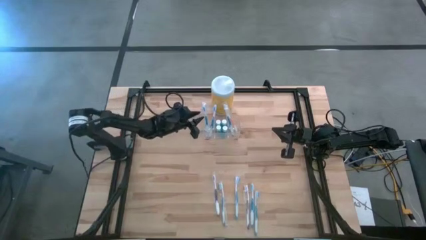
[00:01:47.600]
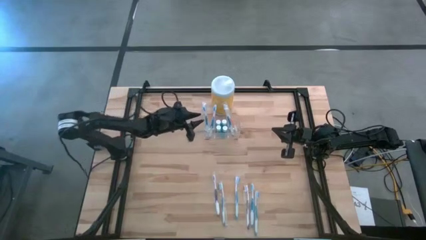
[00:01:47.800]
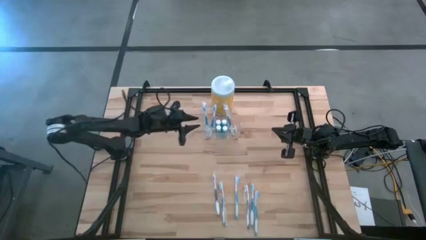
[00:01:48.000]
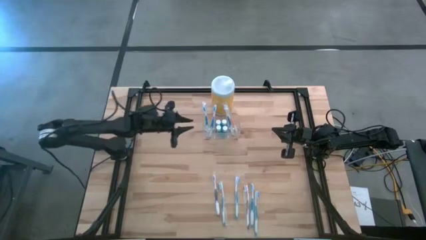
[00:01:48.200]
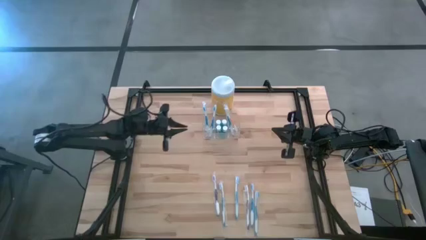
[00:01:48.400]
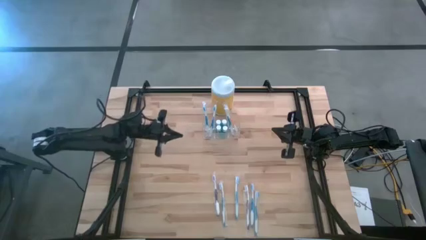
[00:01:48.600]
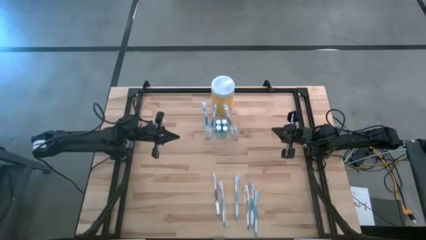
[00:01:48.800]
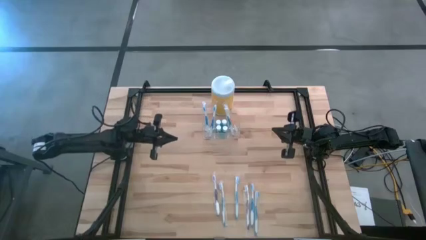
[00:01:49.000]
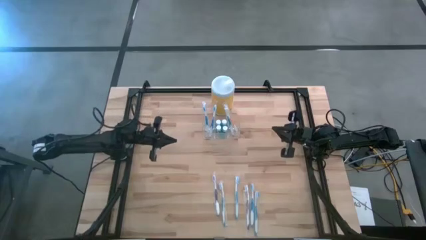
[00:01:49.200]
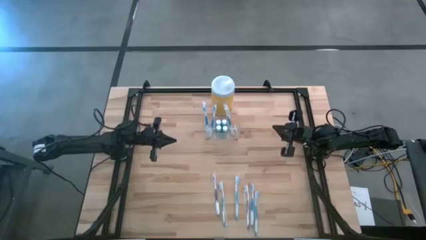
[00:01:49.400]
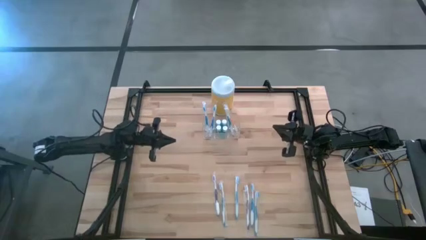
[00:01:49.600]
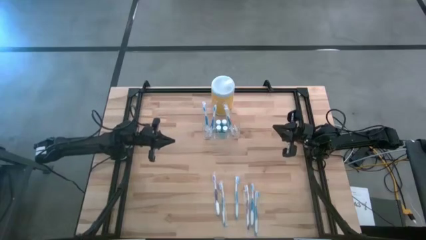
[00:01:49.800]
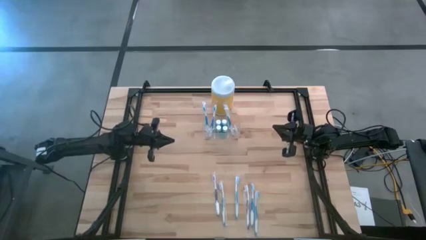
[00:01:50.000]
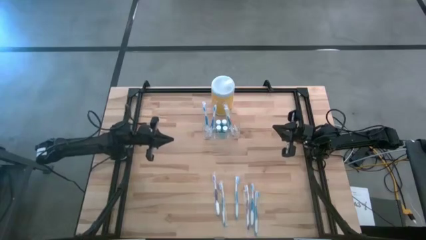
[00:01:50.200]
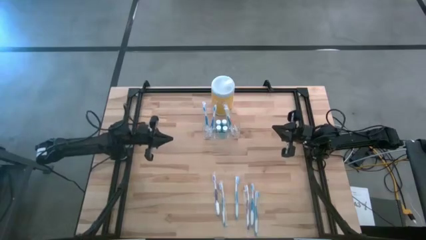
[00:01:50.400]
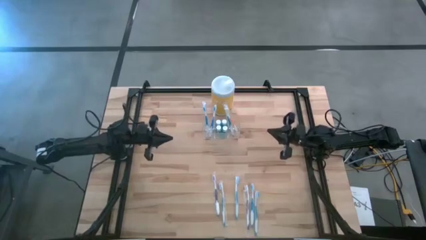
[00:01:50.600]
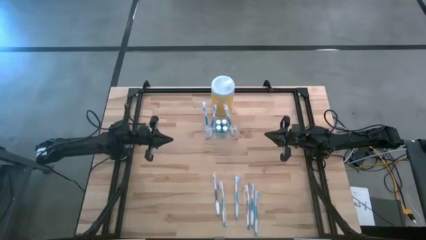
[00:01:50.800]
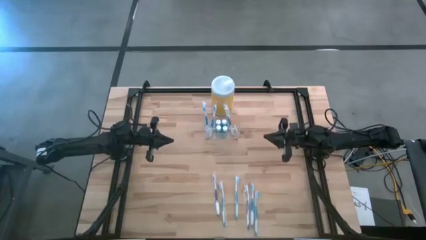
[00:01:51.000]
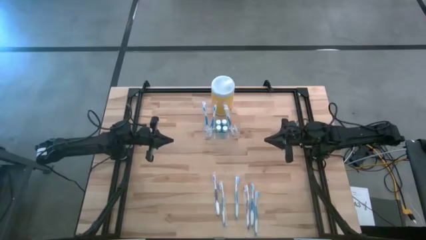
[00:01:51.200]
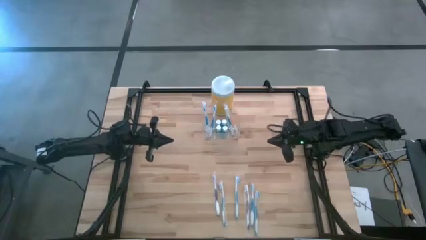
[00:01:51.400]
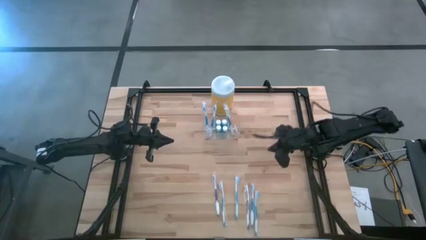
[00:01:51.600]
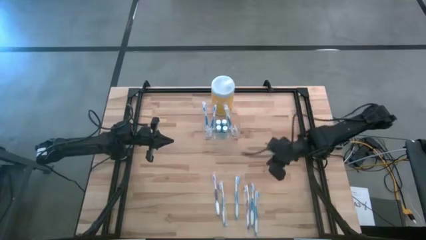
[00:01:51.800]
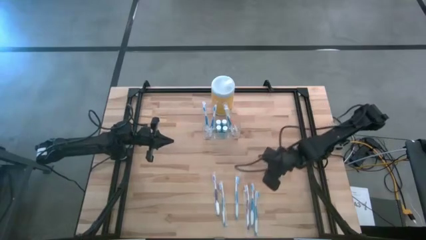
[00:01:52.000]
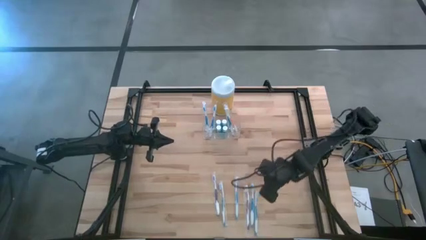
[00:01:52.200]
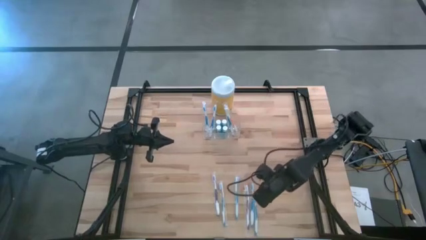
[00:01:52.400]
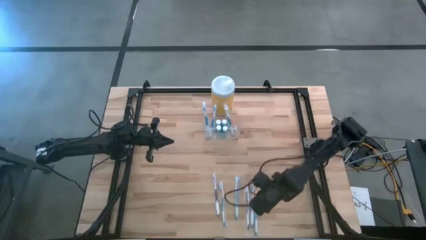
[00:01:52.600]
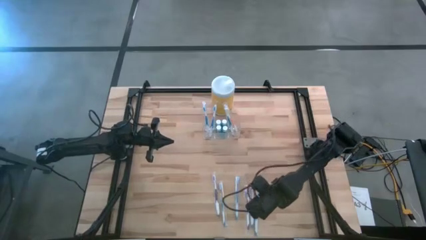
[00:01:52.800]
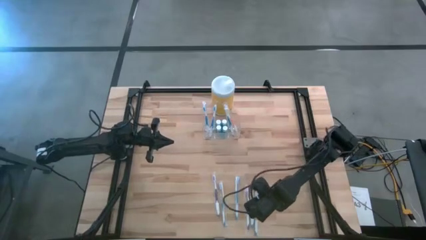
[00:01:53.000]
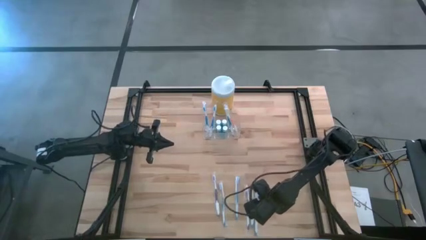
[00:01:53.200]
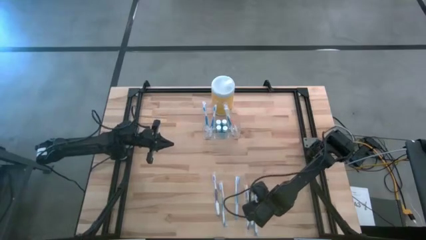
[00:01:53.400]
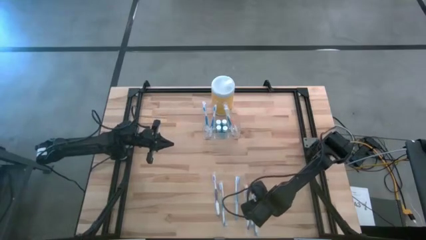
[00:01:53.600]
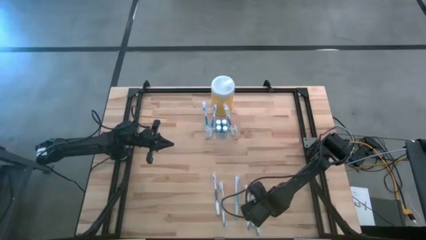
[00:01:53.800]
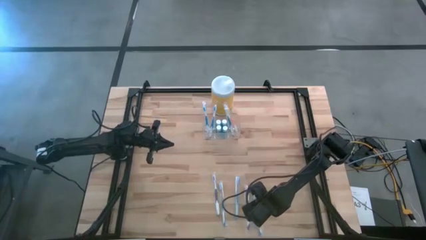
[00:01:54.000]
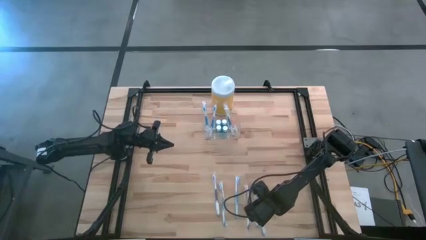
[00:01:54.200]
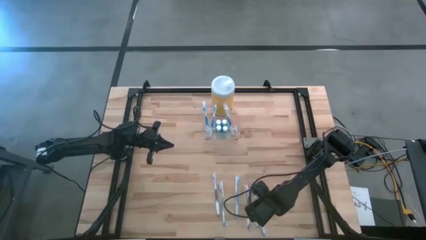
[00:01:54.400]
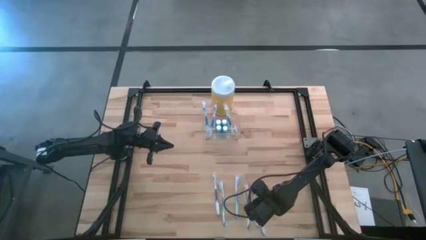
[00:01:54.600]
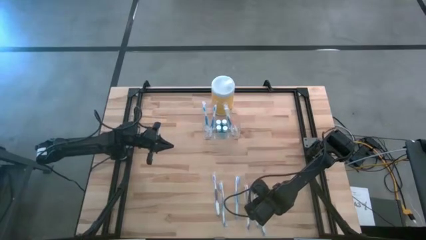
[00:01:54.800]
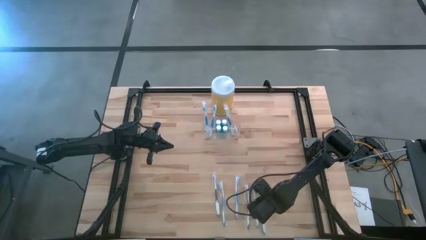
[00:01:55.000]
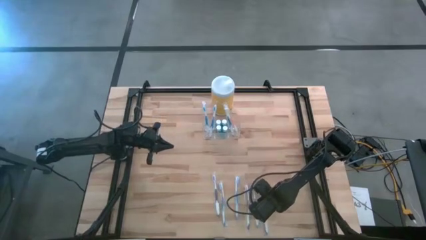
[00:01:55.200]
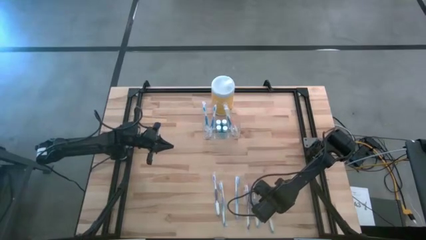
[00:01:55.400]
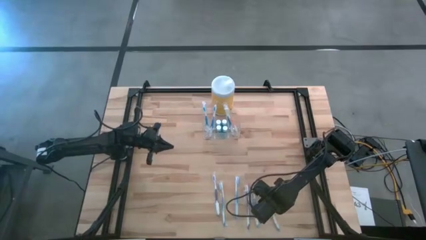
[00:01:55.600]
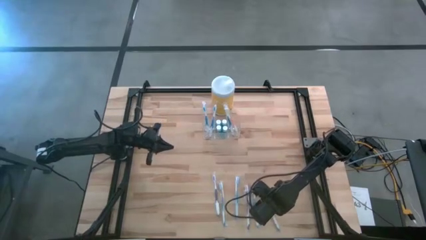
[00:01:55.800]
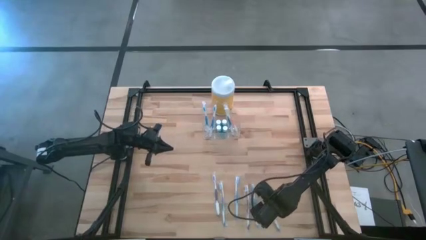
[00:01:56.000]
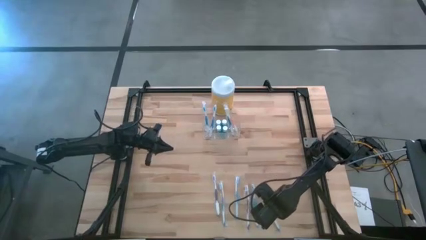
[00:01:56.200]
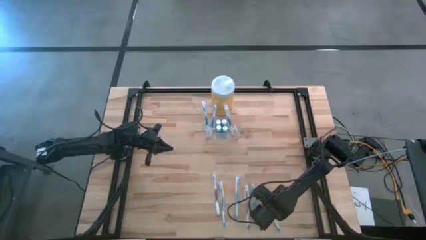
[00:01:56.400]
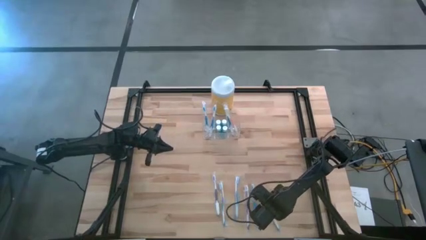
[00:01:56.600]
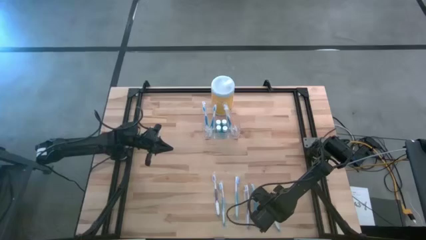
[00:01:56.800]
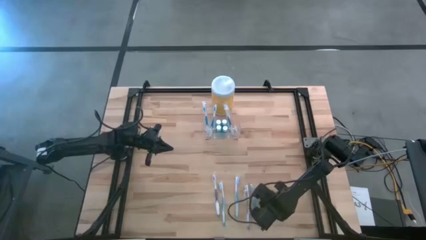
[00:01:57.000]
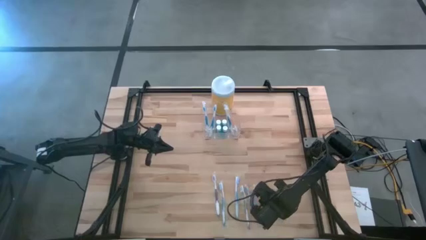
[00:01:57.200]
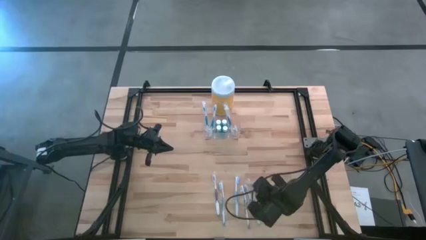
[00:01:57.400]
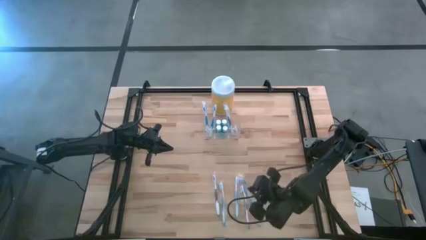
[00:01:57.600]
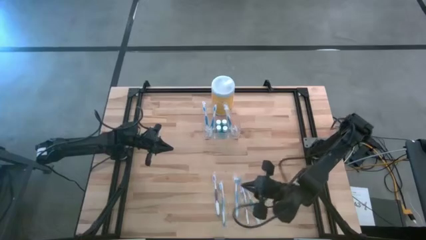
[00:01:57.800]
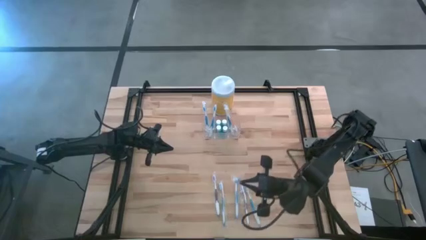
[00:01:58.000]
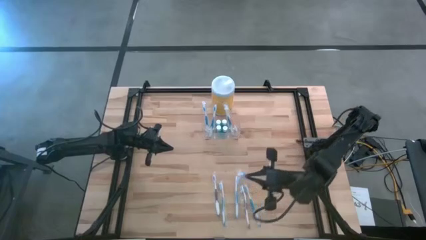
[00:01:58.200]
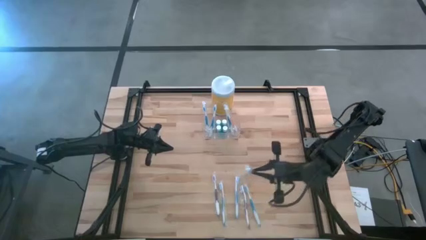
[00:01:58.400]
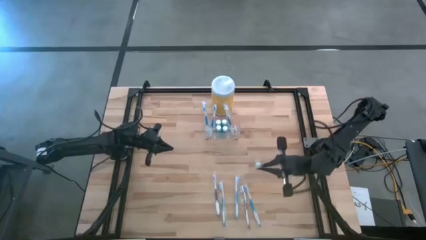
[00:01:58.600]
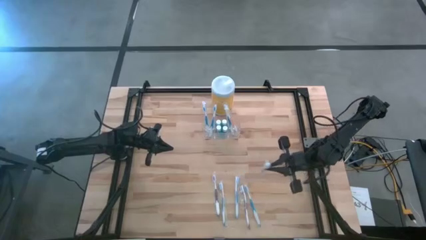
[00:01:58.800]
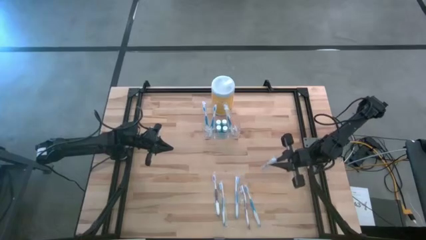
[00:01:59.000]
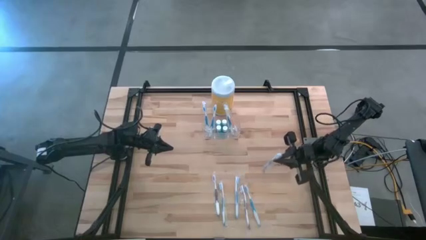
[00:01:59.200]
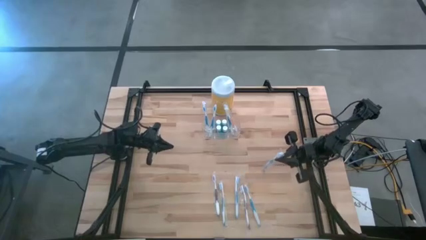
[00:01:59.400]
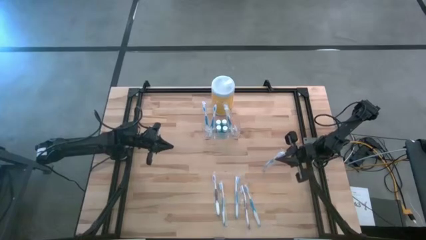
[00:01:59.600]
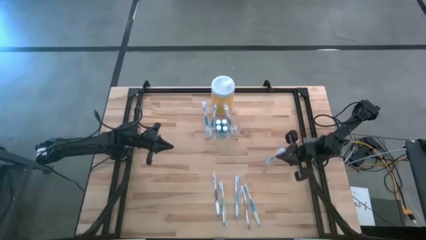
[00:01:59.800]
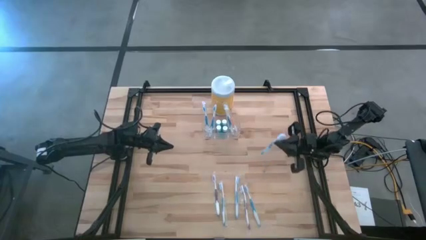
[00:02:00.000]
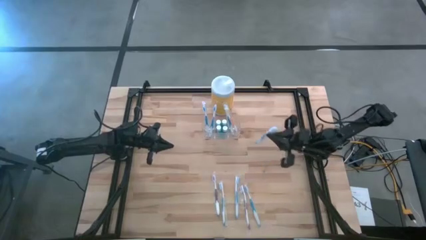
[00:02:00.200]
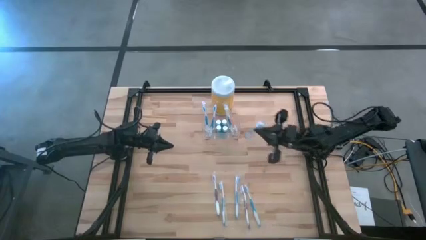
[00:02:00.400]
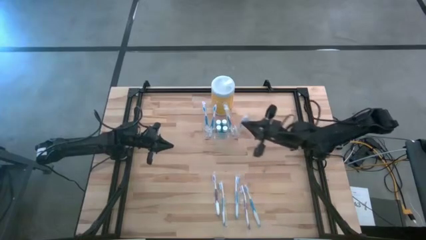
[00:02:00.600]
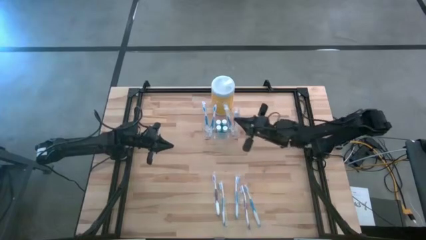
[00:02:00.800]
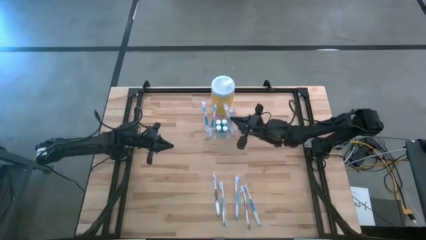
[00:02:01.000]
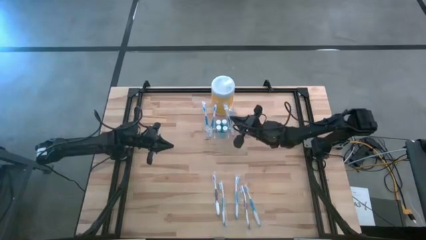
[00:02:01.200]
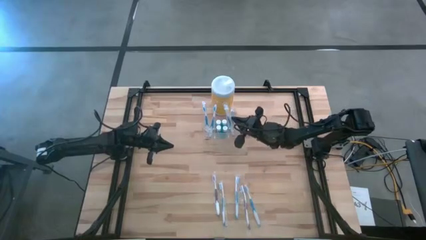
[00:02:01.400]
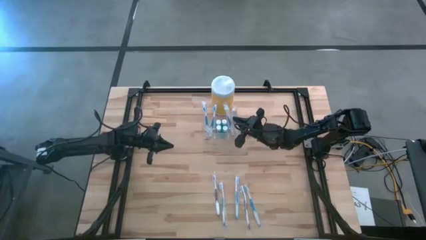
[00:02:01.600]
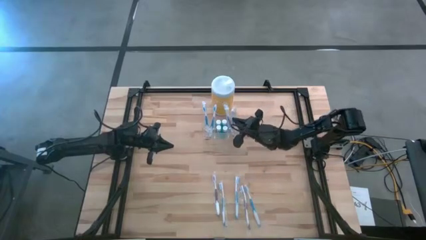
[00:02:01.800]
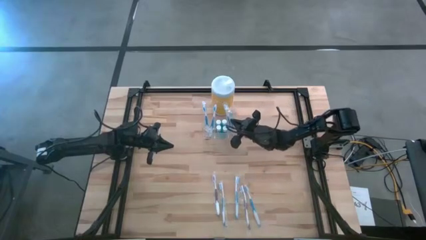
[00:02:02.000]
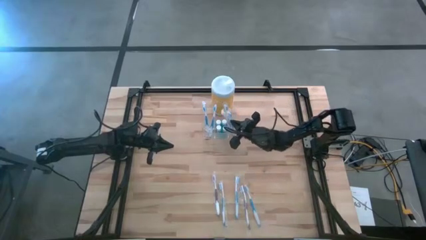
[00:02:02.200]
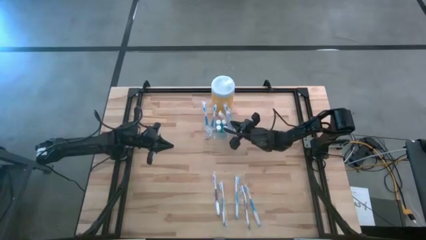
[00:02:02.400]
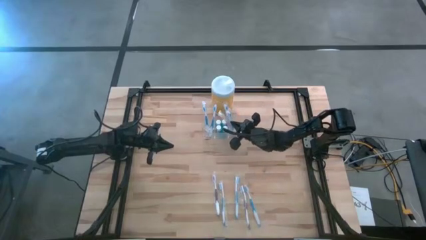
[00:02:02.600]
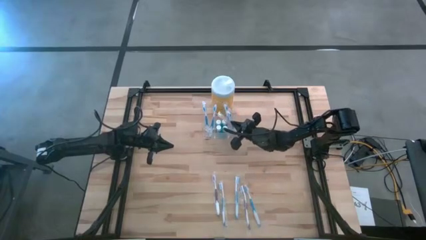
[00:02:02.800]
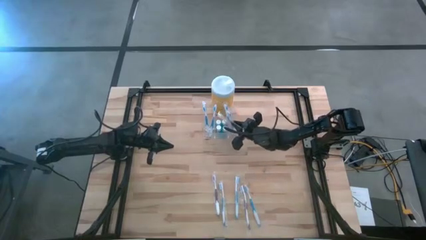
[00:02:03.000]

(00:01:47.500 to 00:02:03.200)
Task: Pick & Place toothbrushing station
Put the blue toothbrush into the transparent organizer
